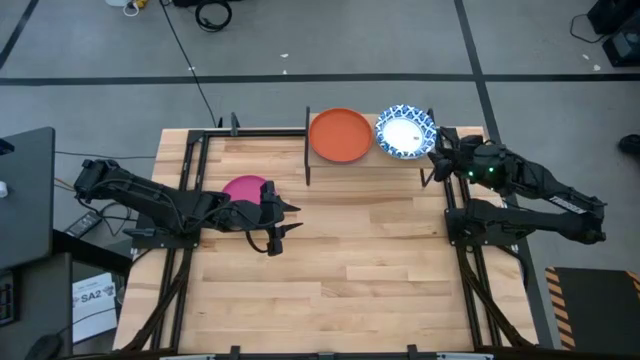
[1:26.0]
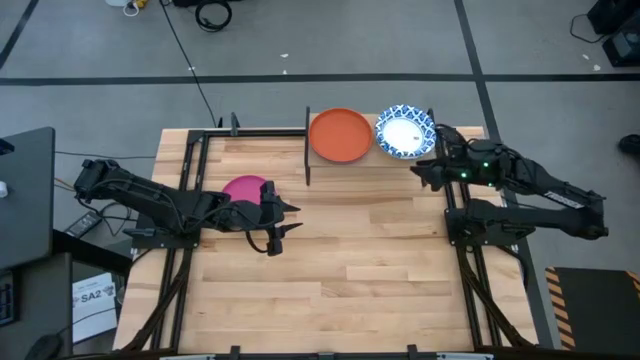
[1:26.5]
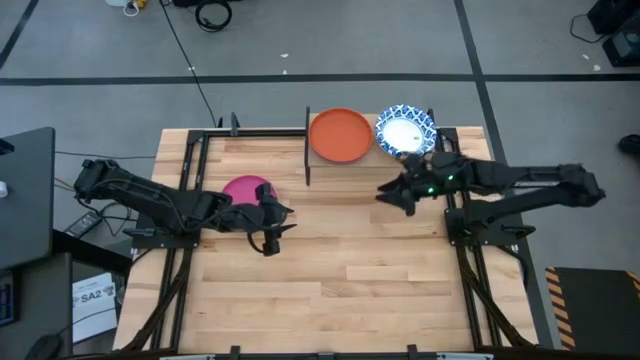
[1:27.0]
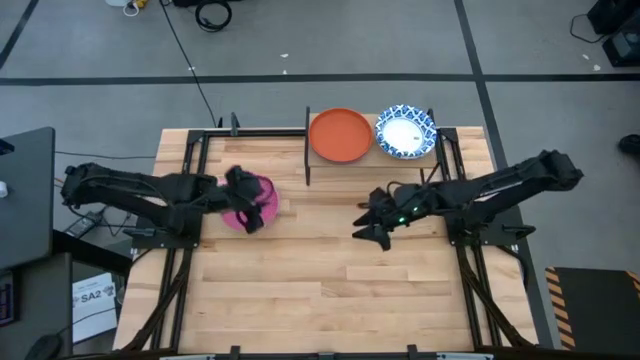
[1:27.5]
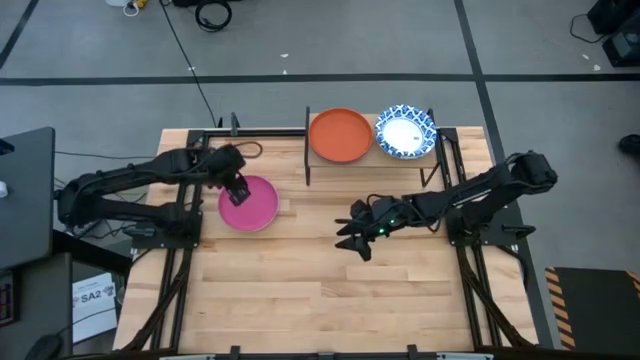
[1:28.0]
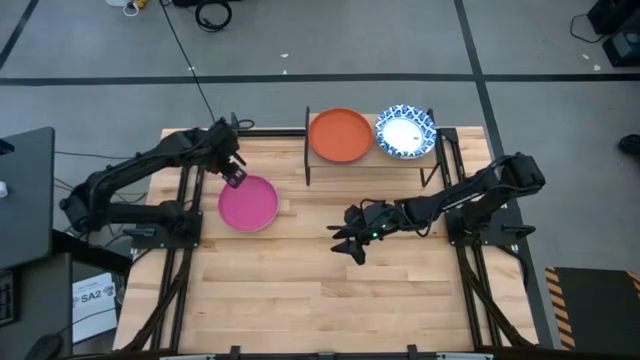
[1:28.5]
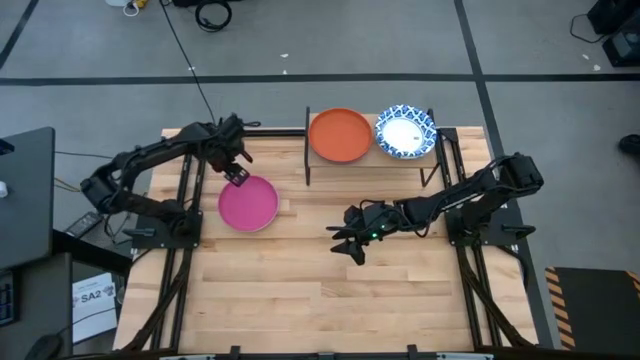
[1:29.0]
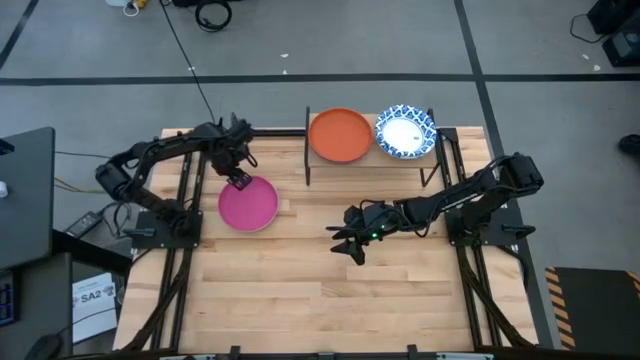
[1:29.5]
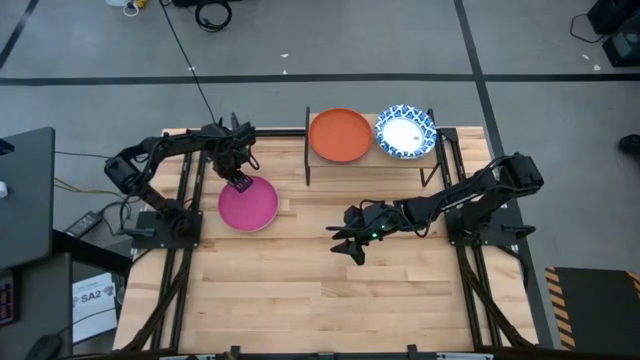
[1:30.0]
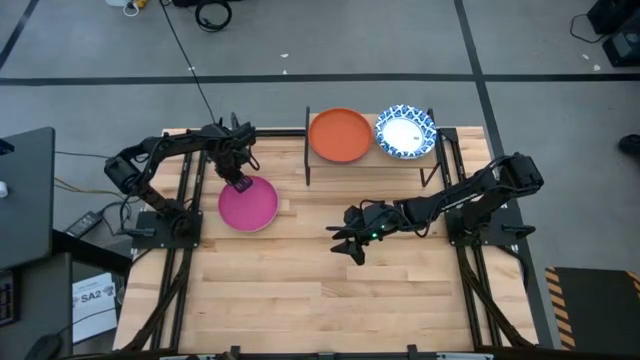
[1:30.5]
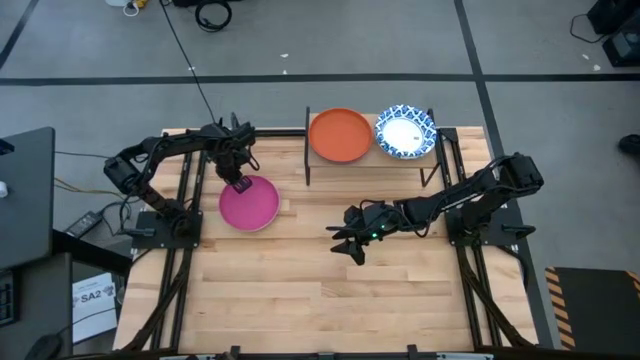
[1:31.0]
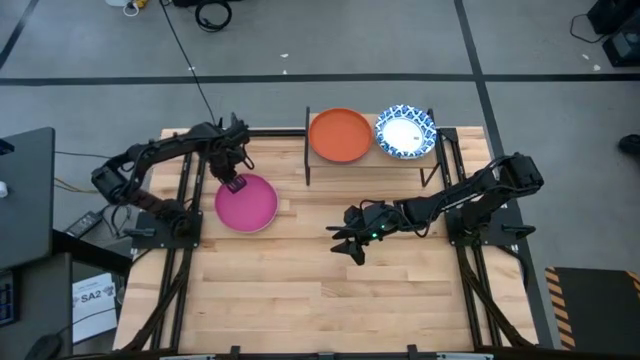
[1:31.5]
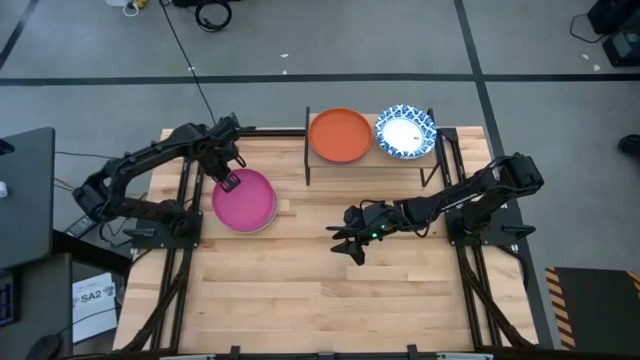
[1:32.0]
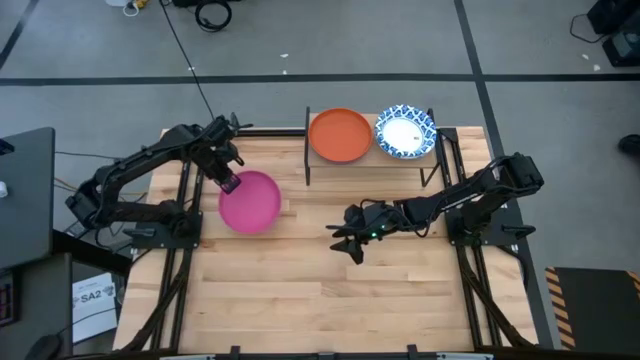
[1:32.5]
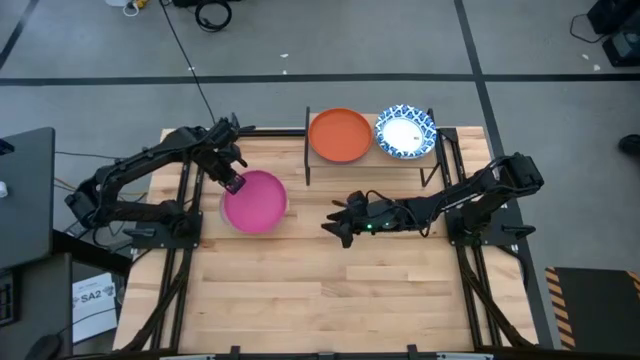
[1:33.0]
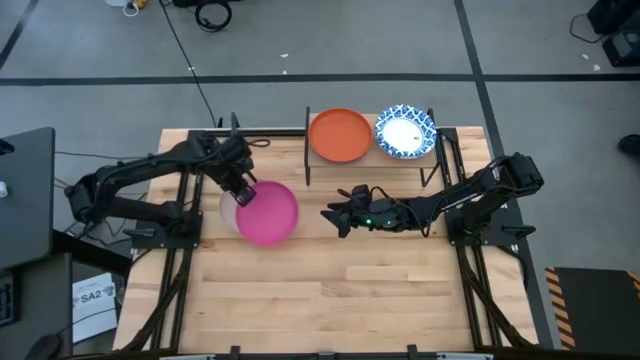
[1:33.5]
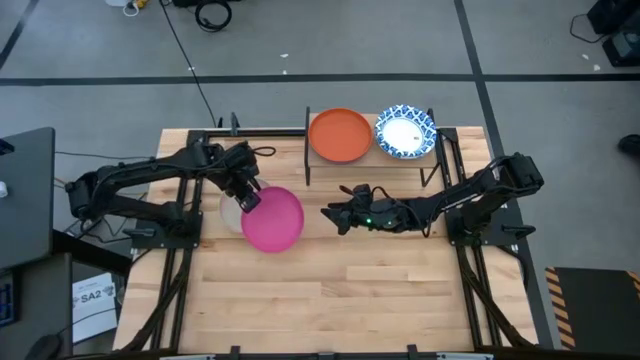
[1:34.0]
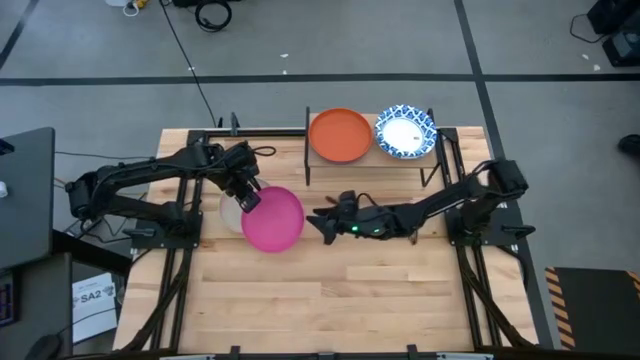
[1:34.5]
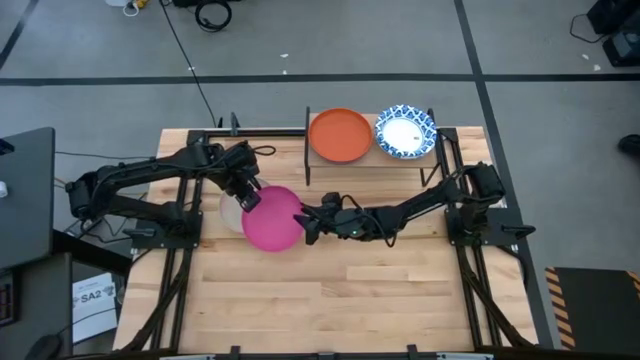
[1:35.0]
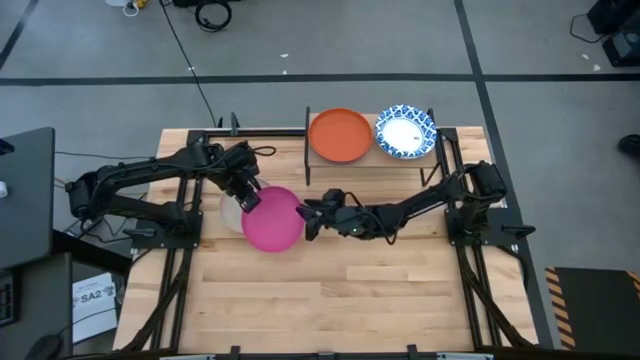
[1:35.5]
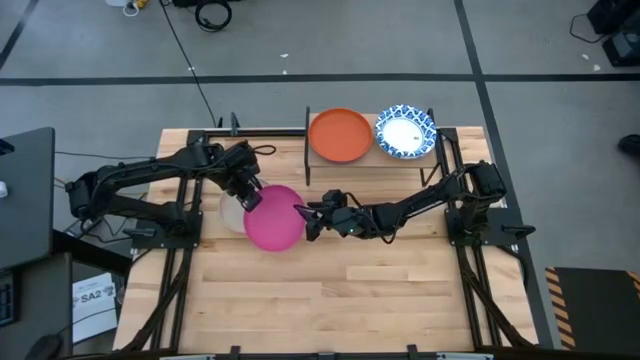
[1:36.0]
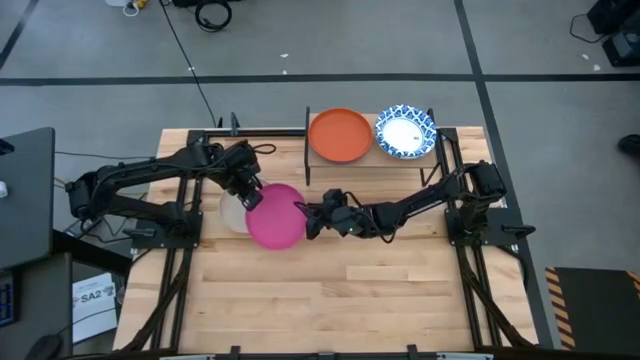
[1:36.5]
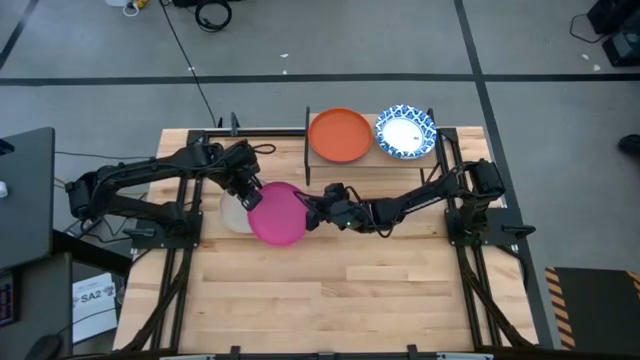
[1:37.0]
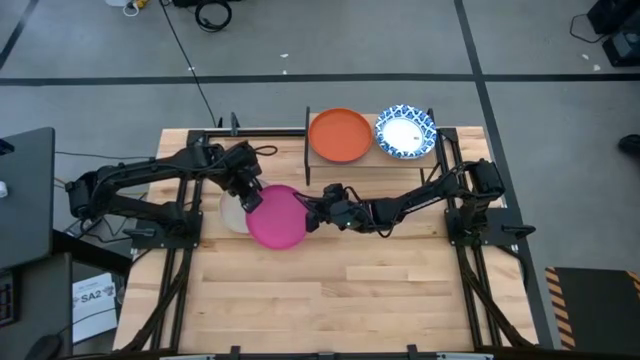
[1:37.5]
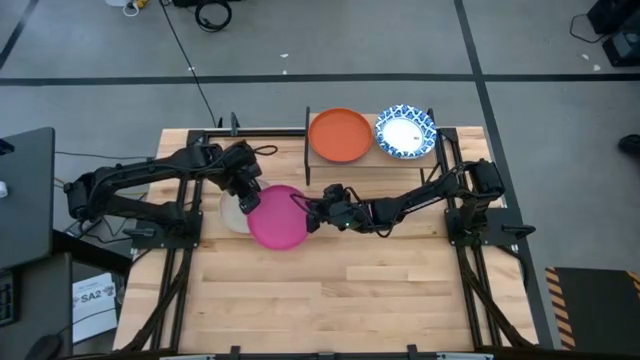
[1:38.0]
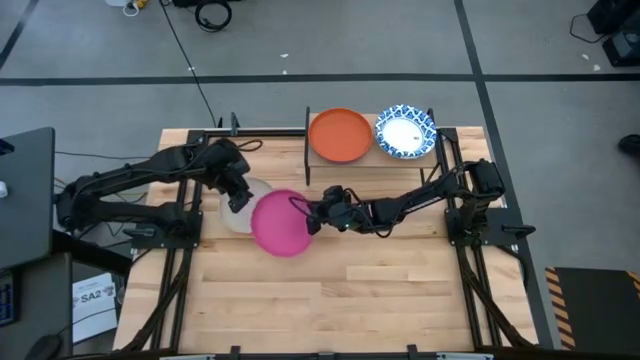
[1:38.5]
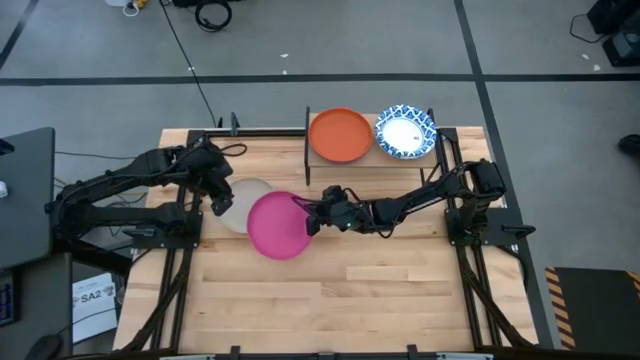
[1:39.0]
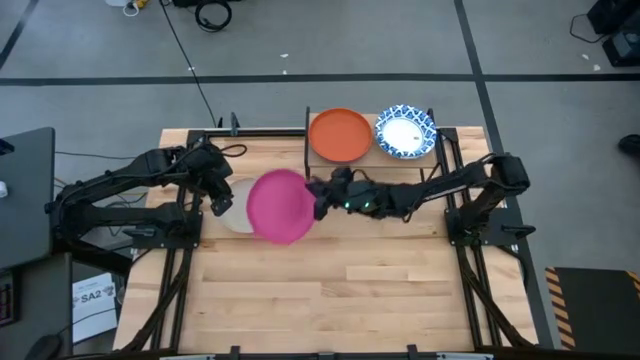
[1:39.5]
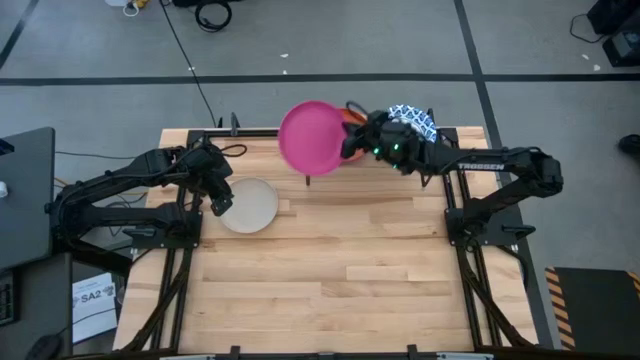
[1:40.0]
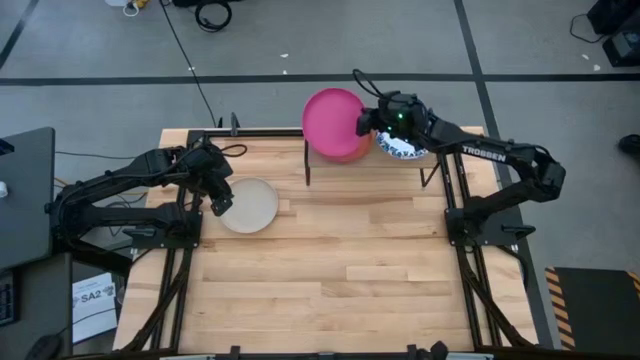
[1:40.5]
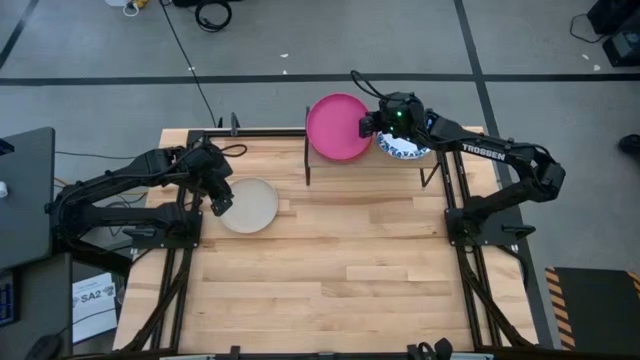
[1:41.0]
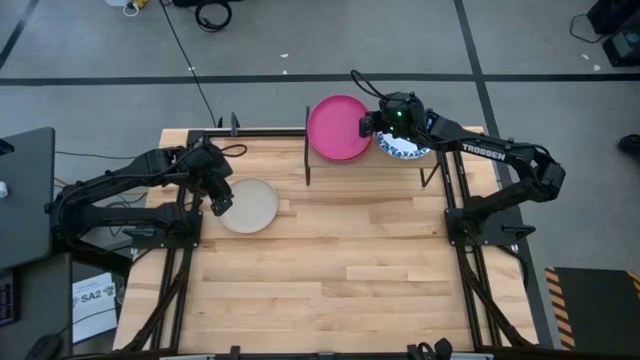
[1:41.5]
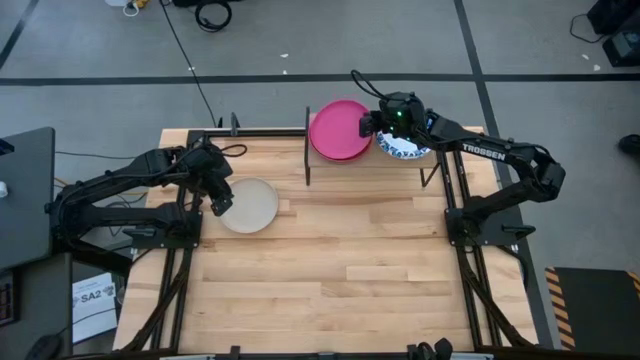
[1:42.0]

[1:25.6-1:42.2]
Task: Place and stack plates onto a shelf
Stack the pink plate on top of the orange plate on the shelf

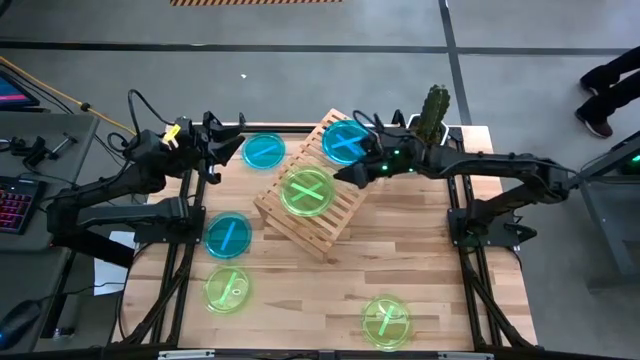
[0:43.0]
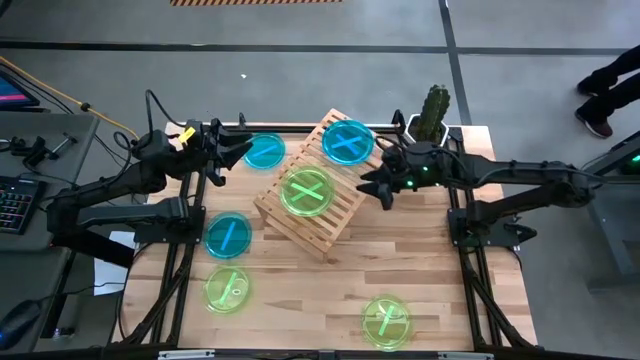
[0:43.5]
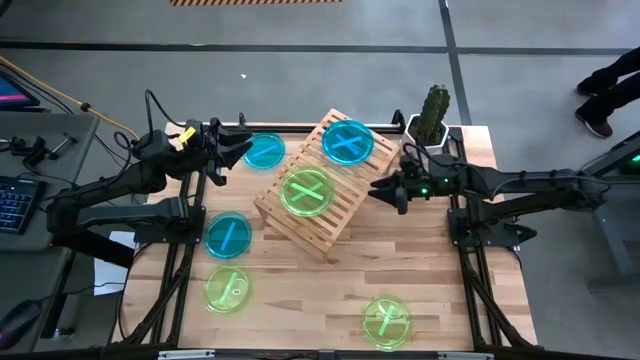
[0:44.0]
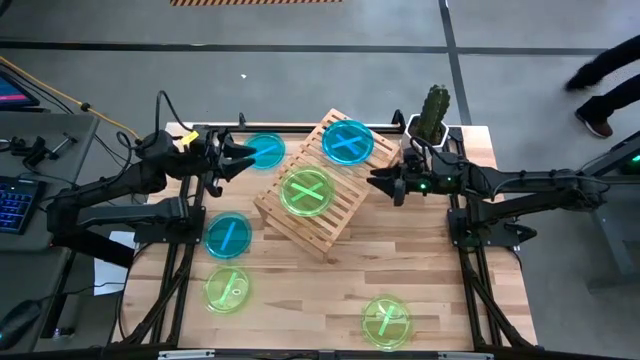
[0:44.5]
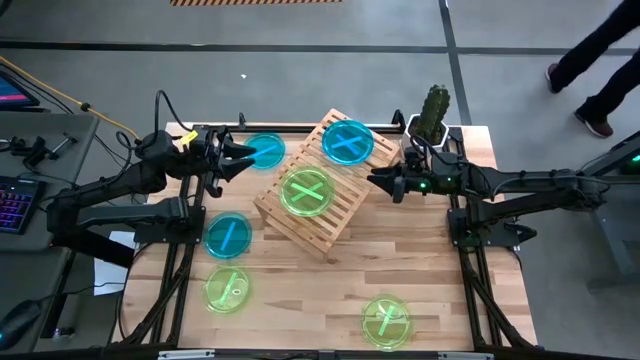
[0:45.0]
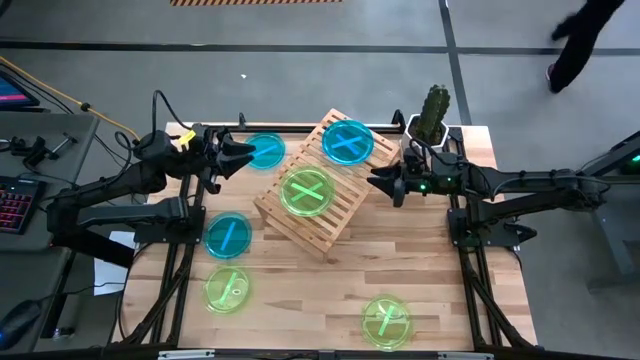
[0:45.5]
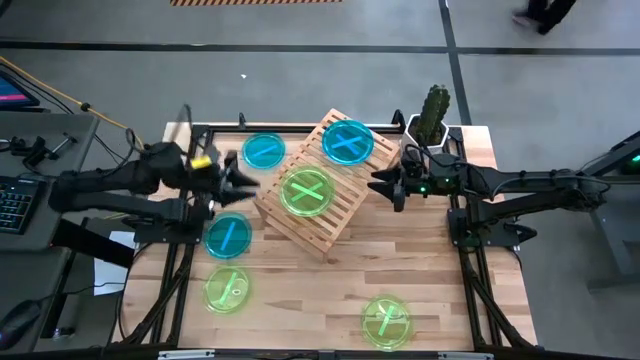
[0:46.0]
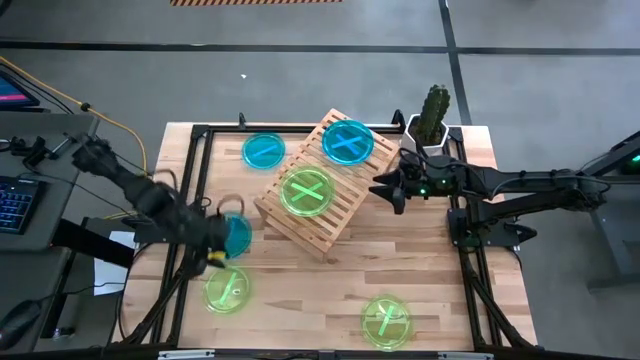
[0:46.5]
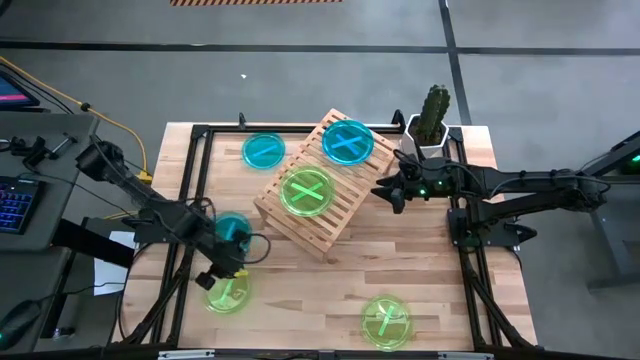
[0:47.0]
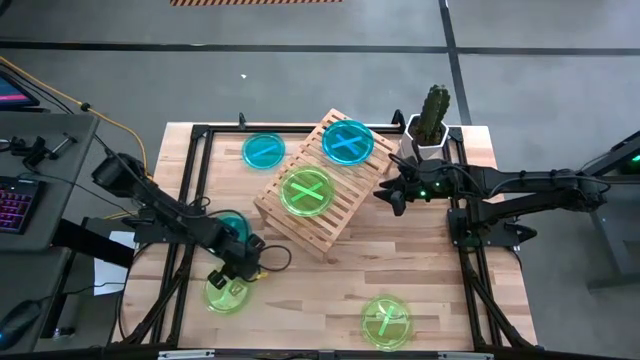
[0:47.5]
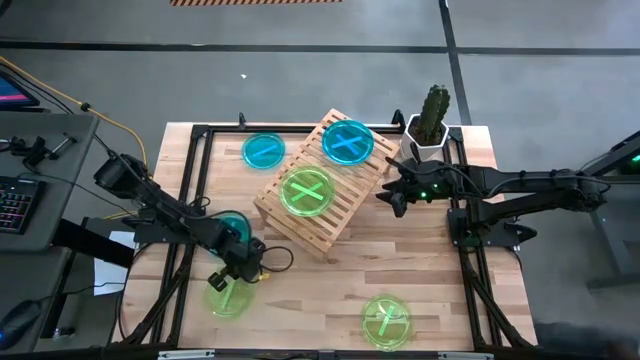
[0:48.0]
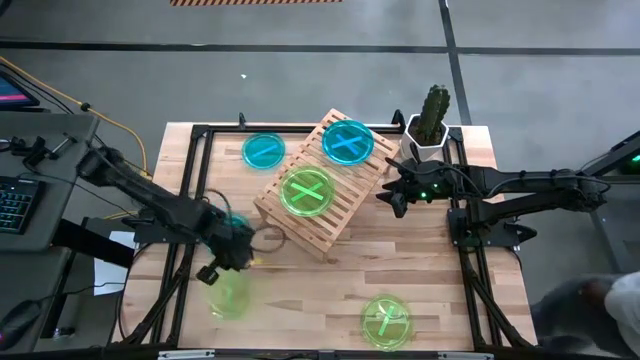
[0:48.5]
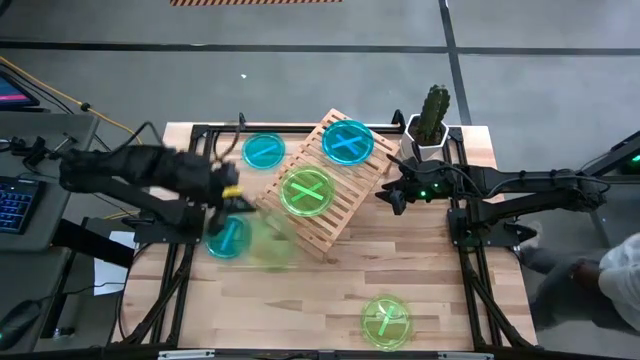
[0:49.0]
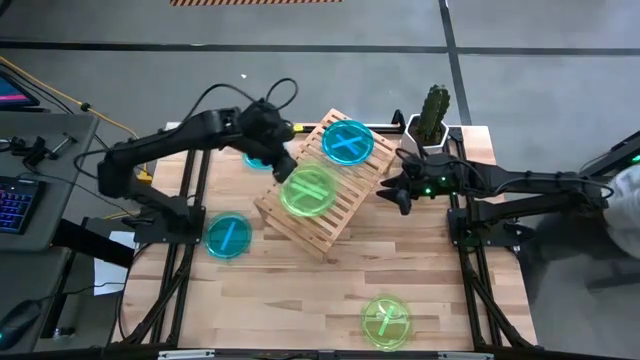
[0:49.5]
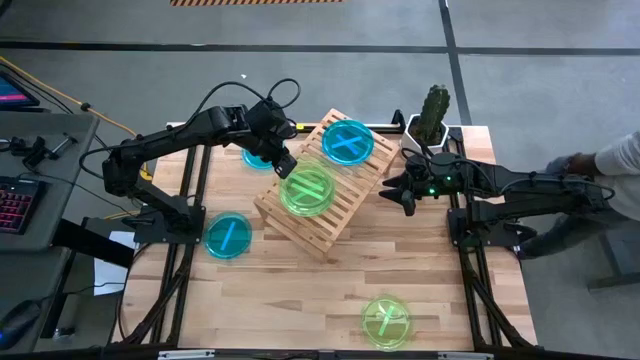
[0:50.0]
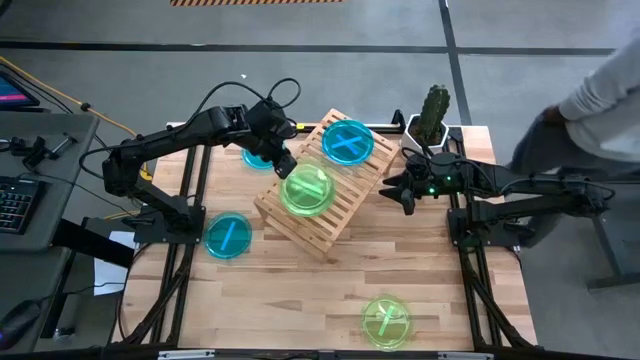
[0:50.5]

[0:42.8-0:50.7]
Task: Place and stack plates onto a shelf
Stack the green plate on top of the green plate on the shelf
